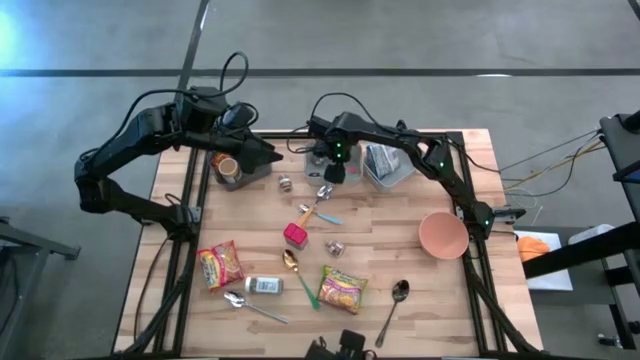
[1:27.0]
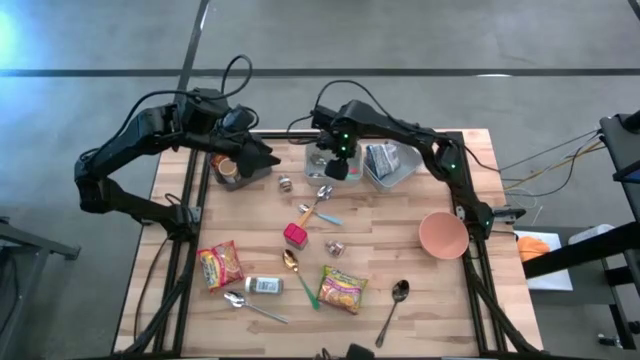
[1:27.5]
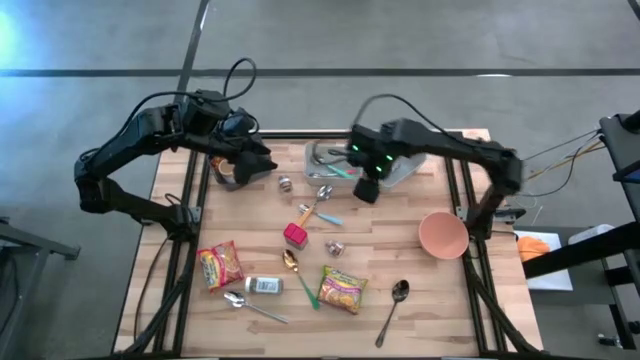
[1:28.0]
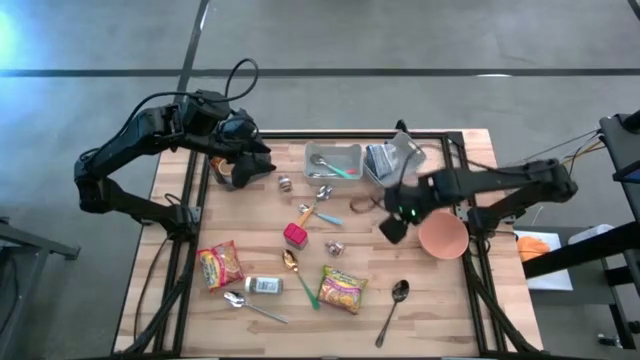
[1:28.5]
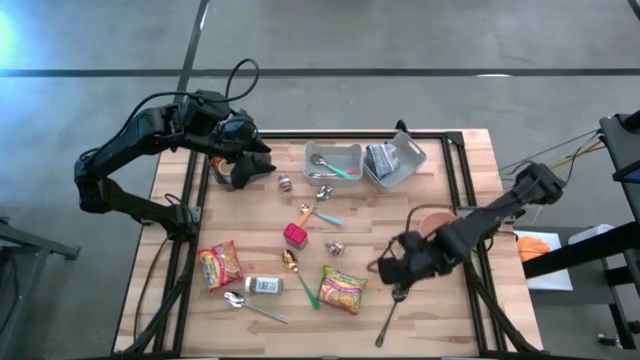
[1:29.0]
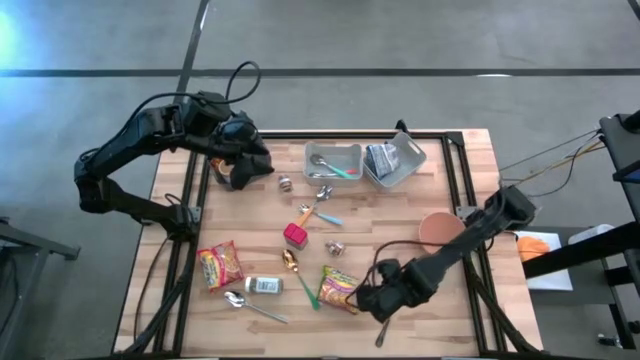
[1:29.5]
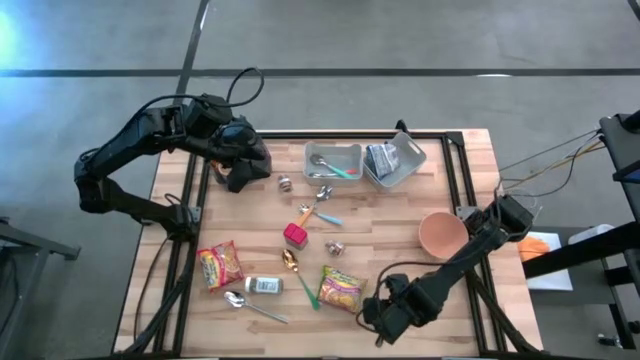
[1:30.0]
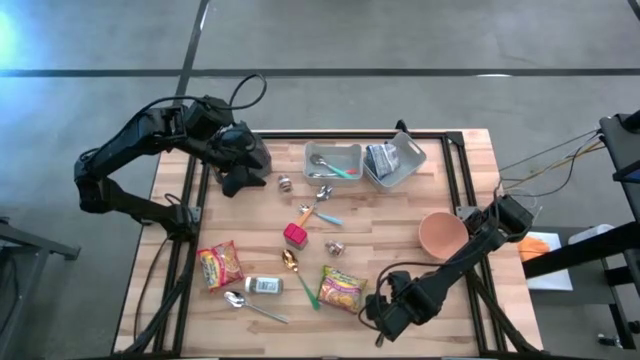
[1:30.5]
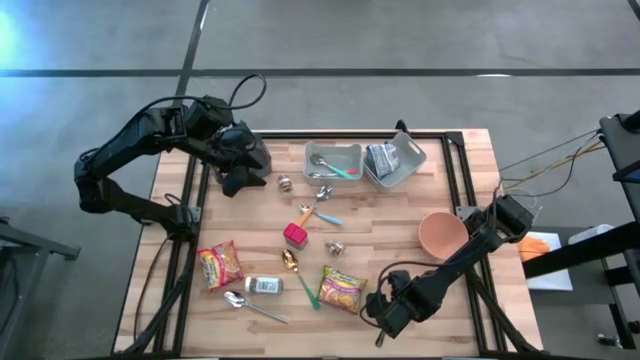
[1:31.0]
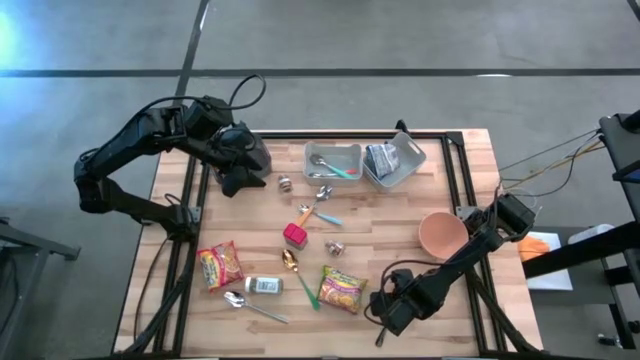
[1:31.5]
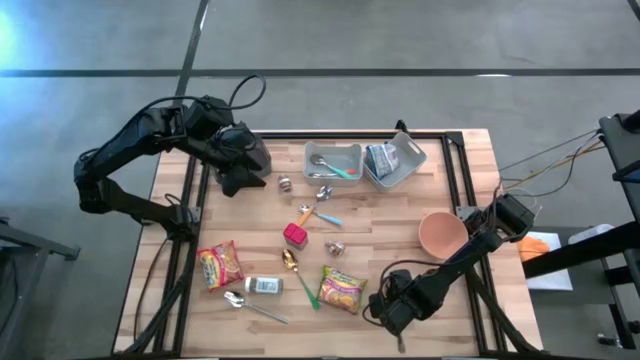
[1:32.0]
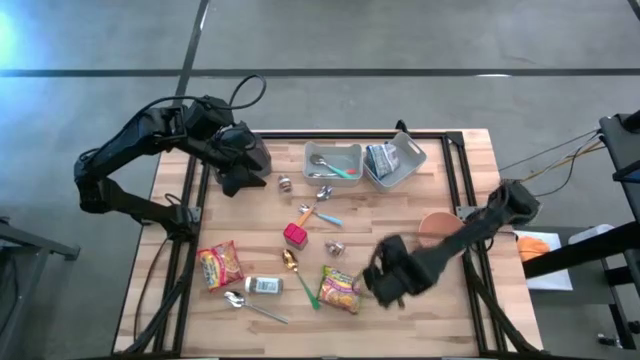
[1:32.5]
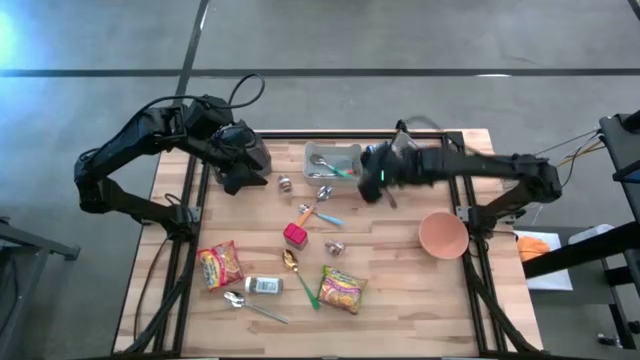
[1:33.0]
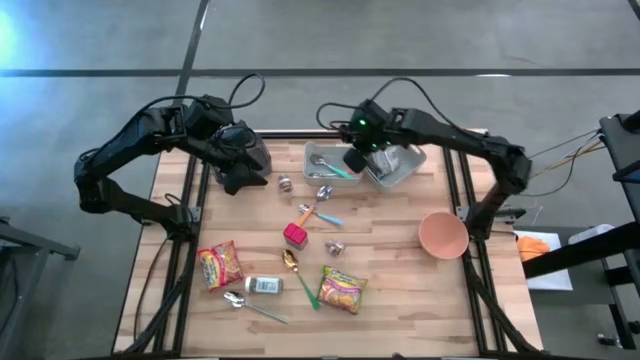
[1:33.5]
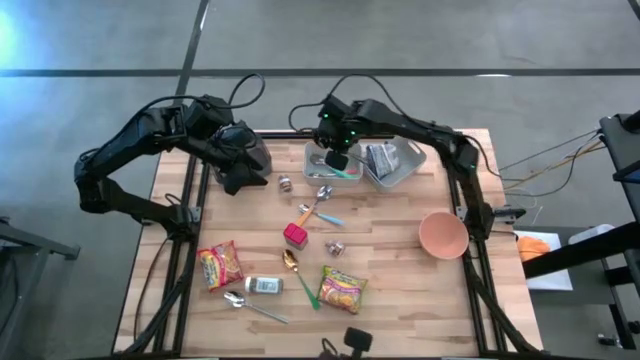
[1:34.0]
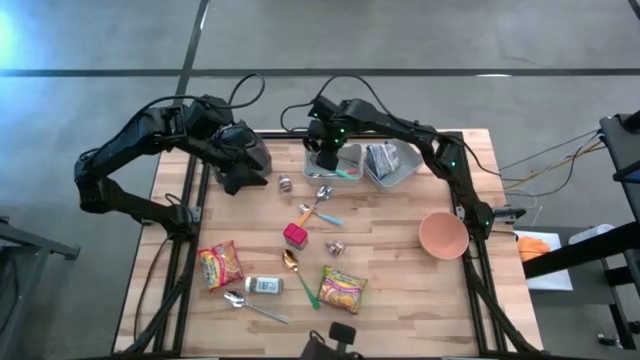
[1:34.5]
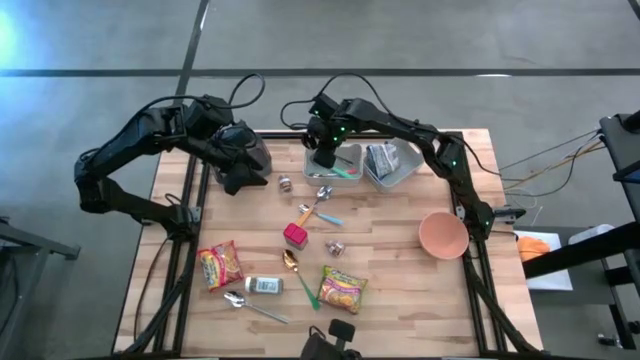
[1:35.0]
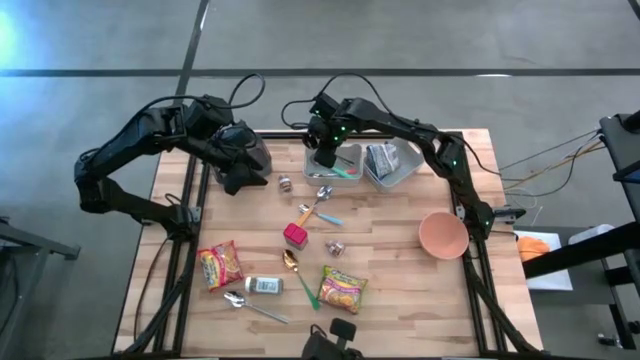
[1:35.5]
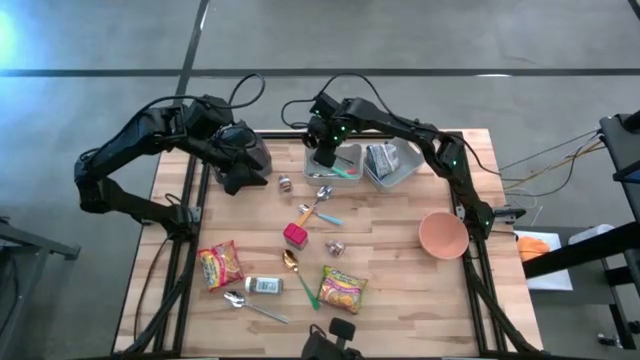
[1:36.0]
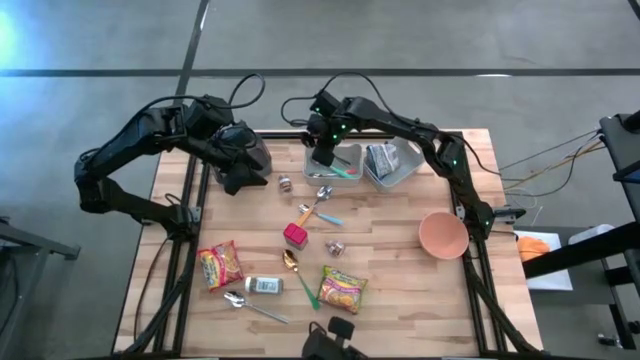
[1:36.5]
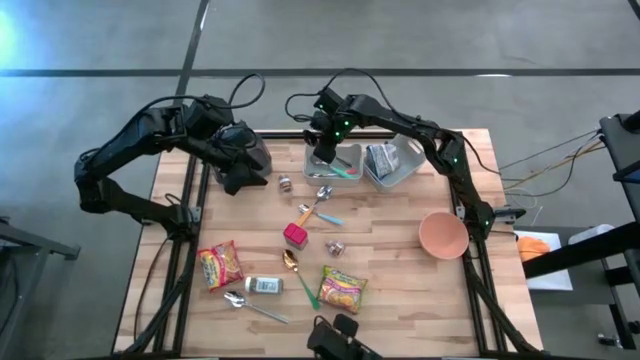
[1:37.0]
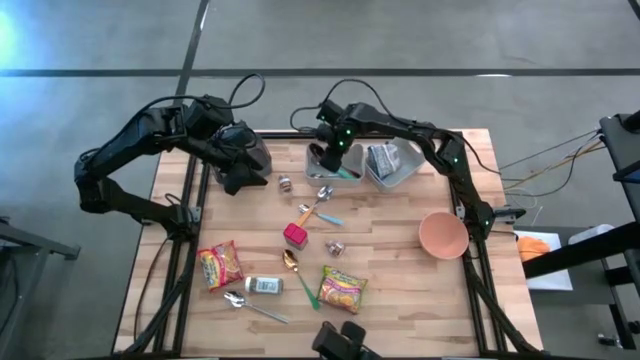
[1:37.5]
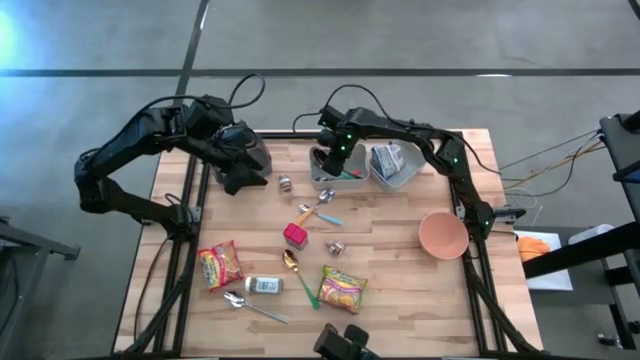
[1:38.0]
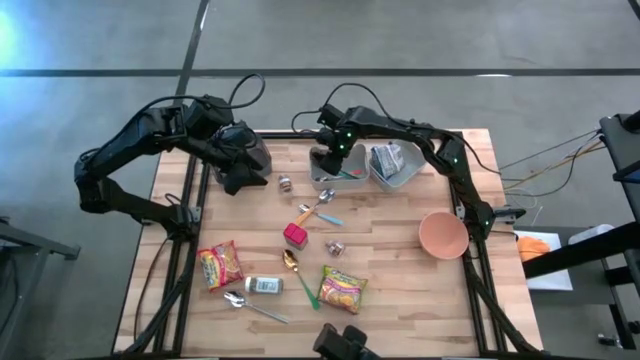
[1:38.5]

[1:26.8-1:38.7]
Put the black spoon into the left gray bin

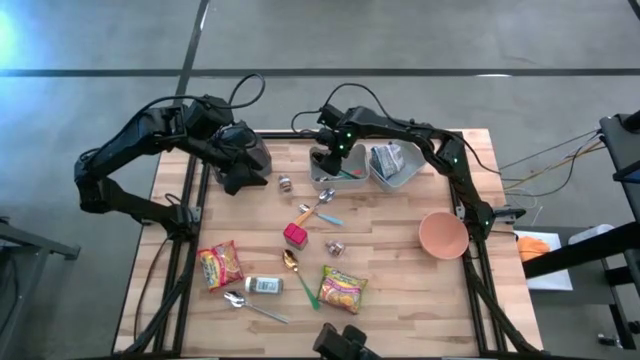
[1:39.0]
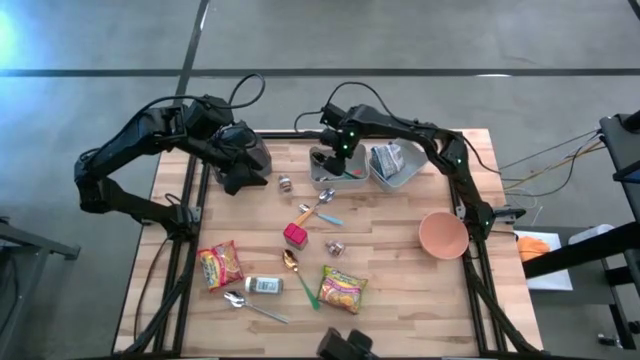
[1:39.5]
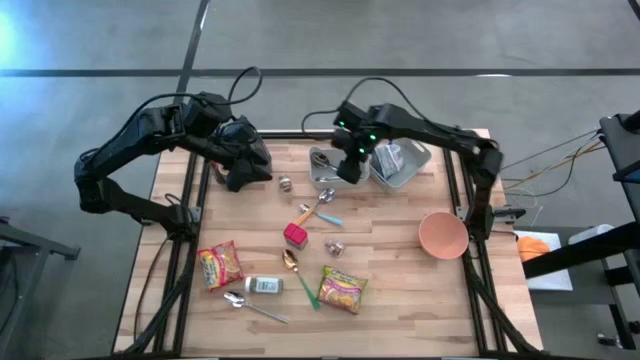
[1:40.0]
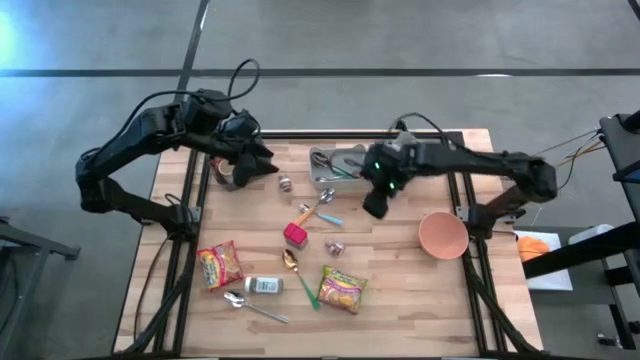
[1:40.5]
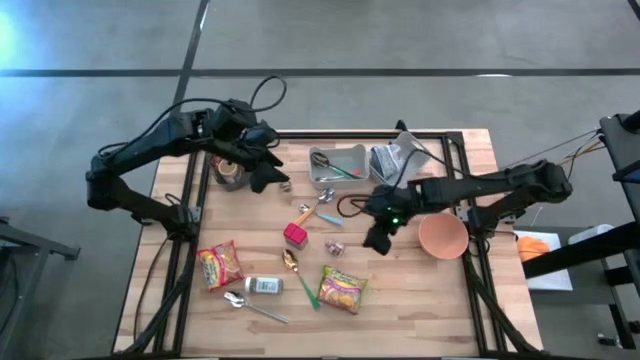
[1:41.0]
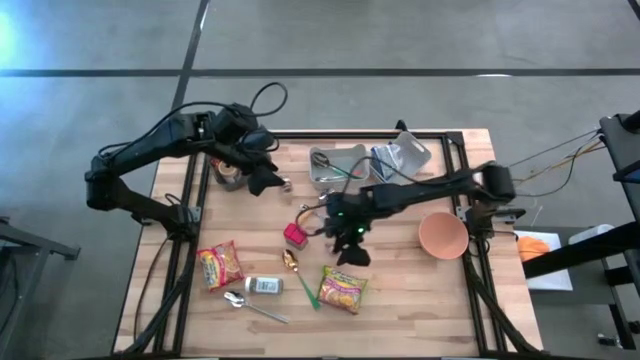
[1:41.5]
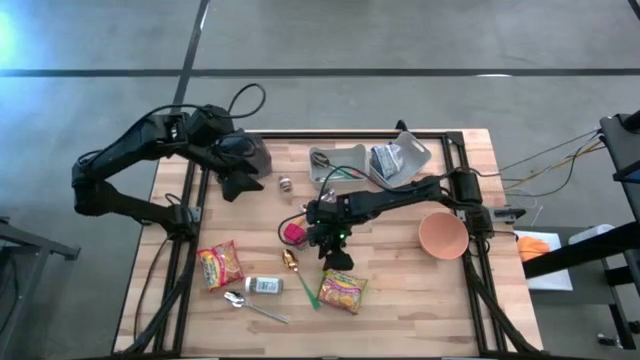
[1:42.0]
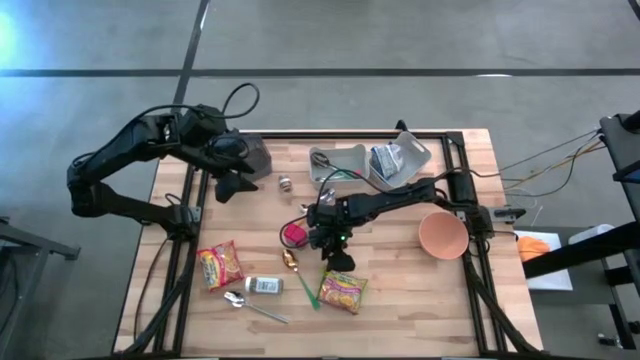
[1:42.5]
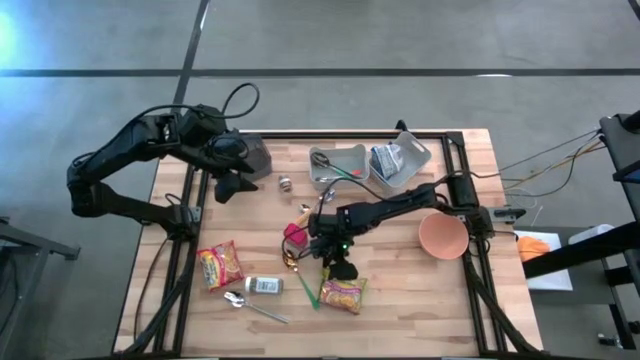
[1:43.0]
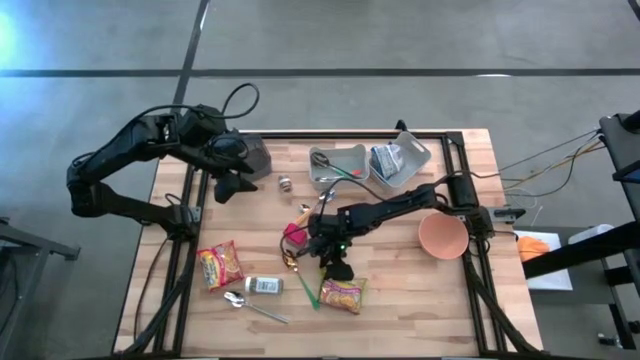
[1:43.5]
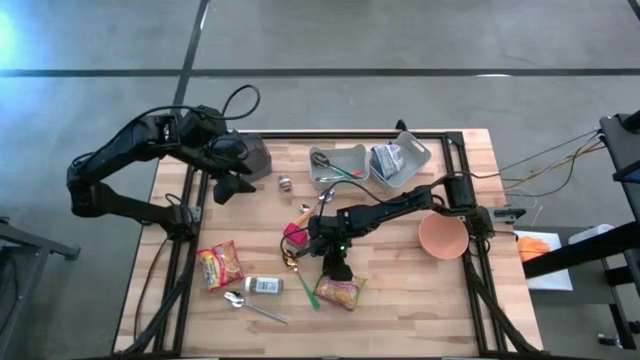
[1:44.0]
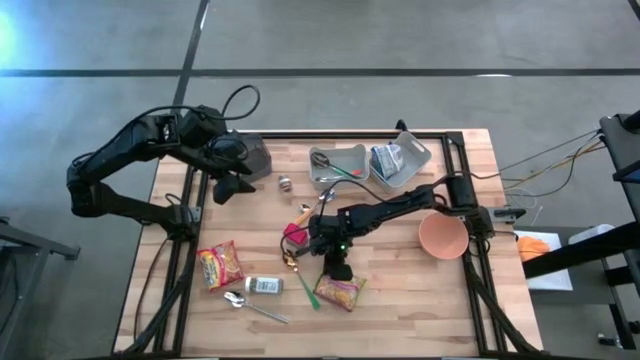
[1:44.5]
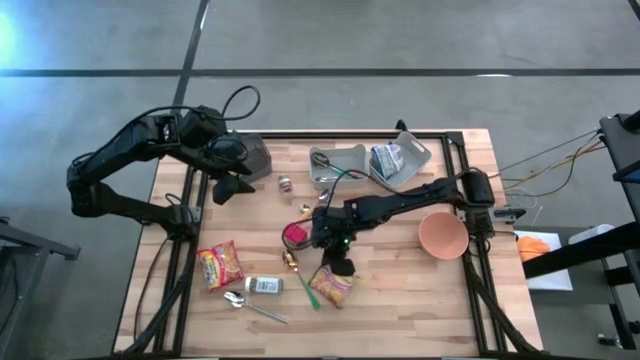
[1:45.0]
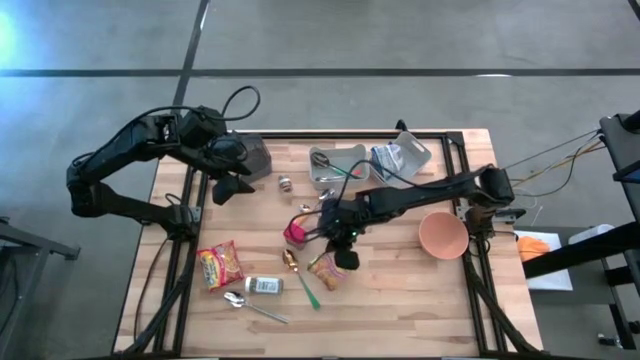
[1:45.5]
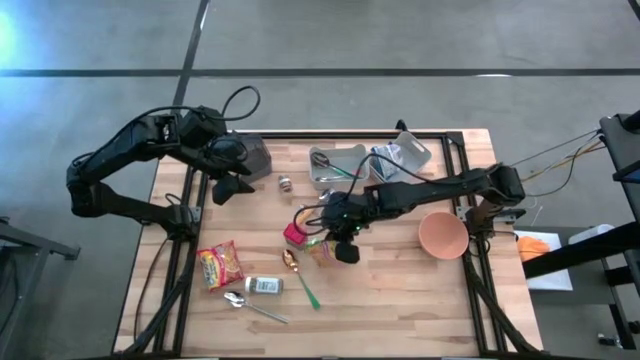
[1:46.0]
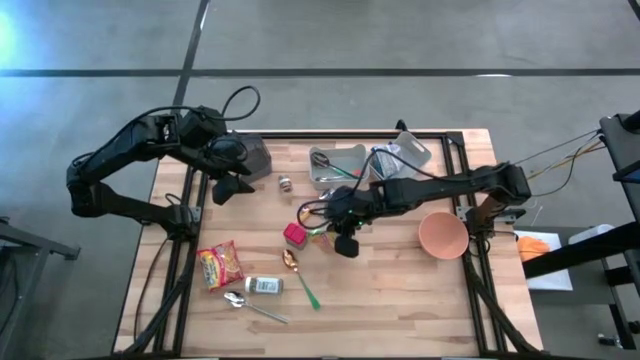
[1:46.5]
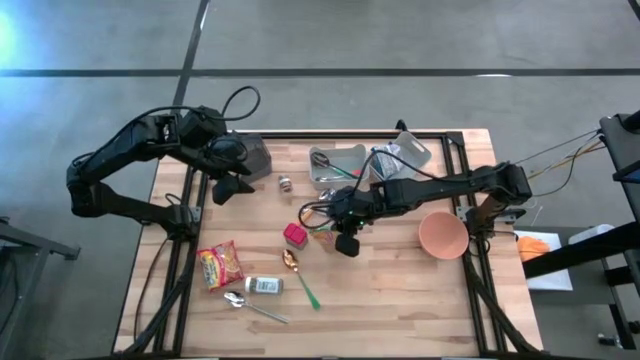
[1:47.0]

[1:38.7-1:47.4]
Put the green noodle pack into the right gray bin
